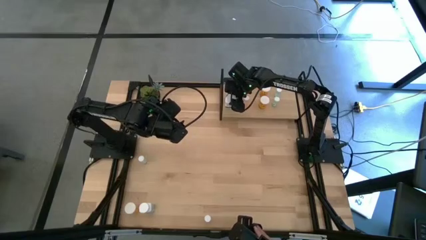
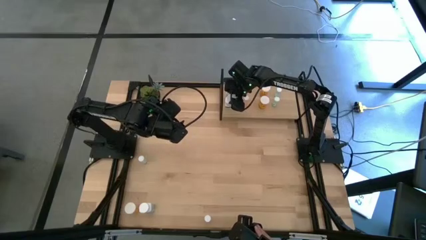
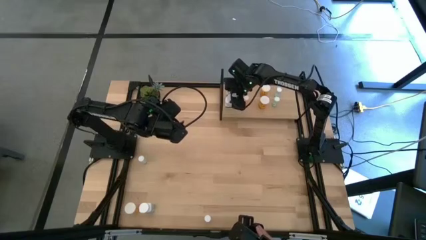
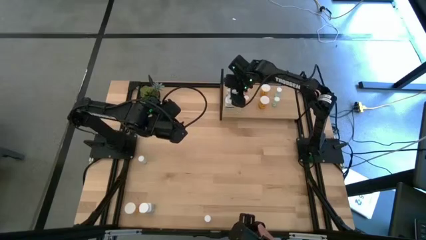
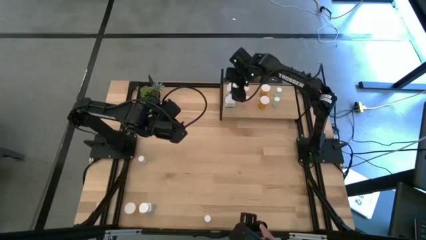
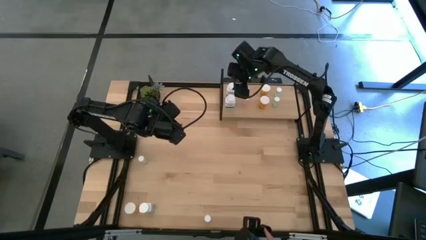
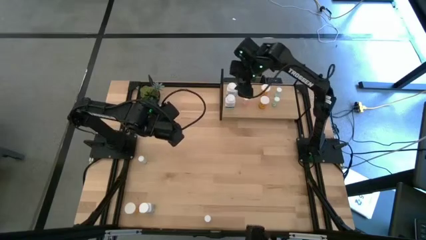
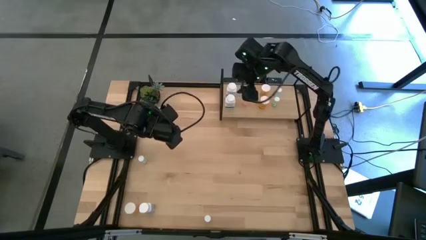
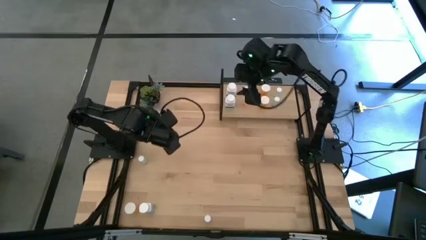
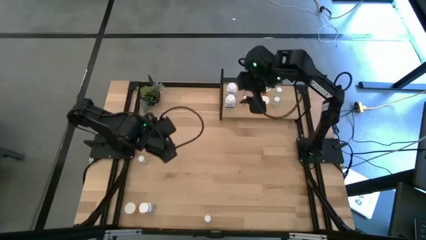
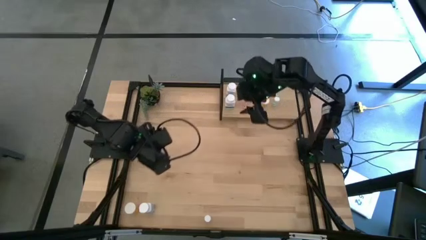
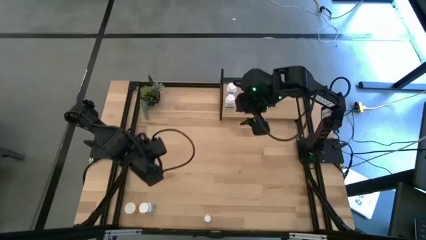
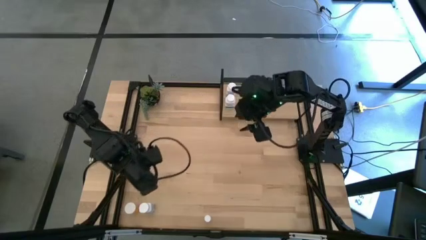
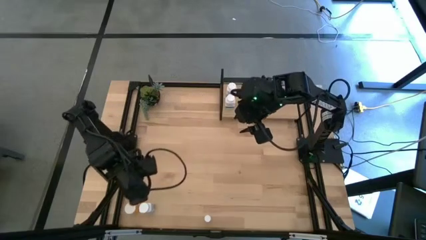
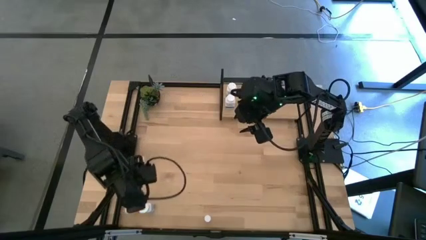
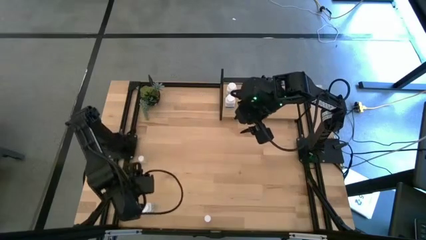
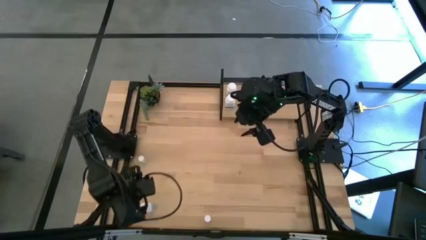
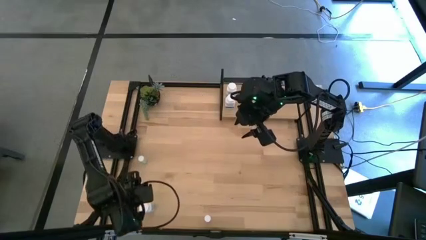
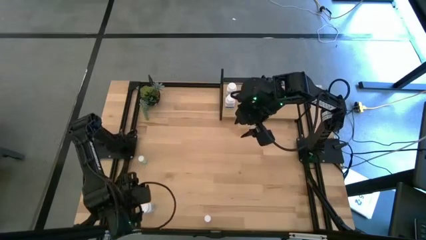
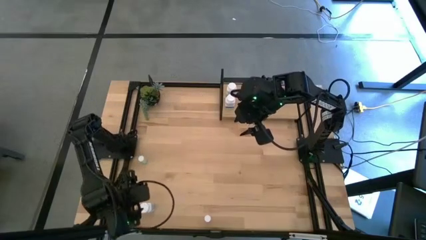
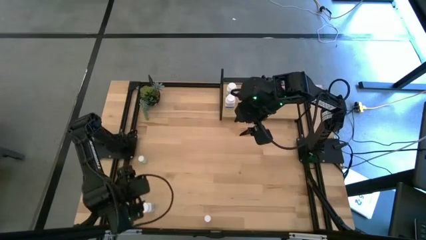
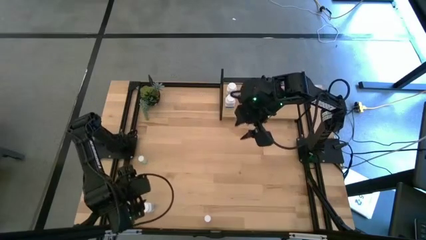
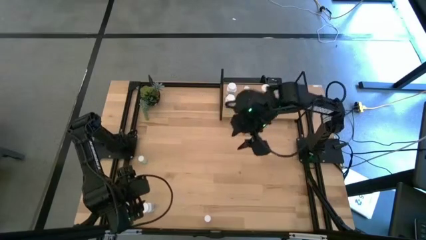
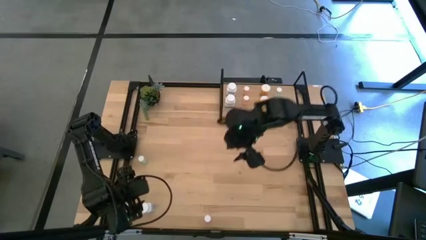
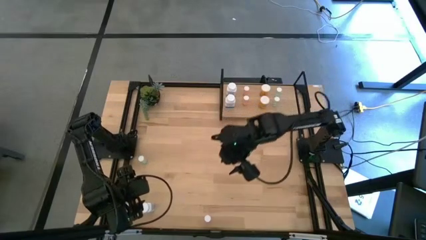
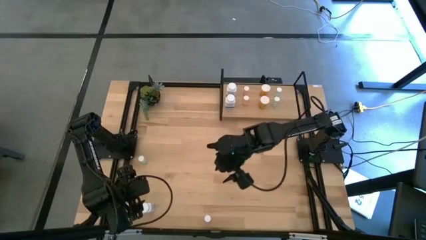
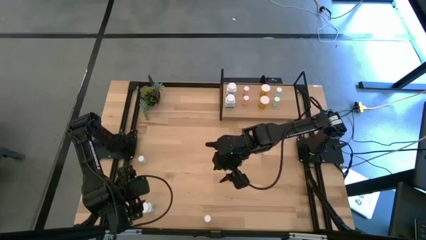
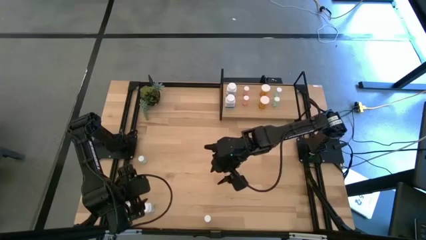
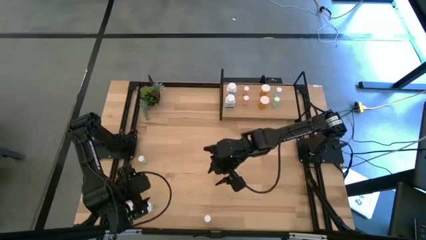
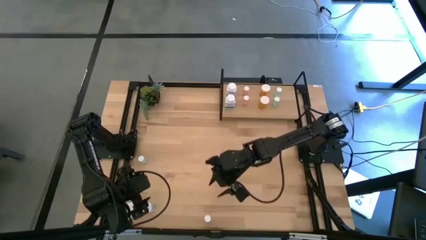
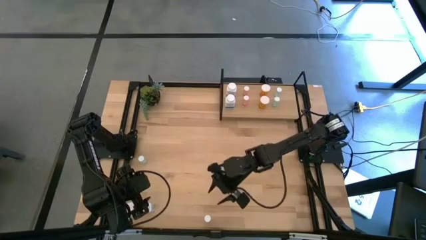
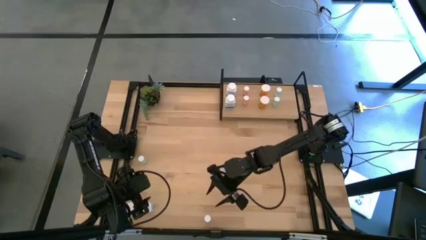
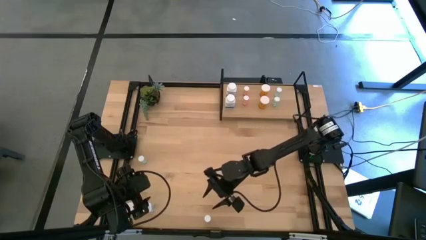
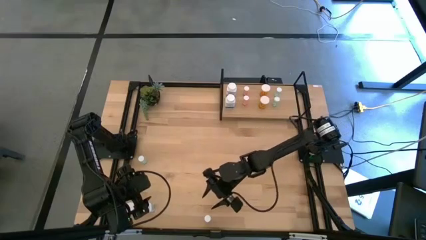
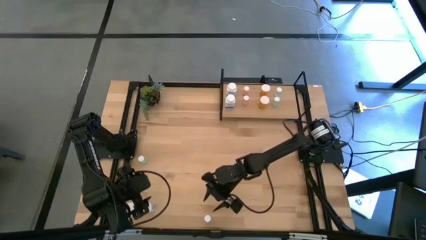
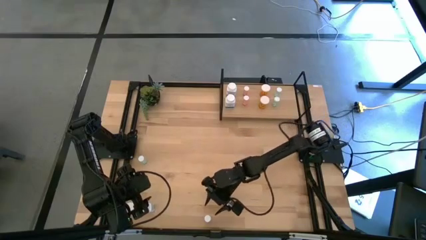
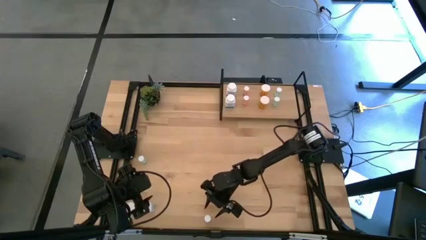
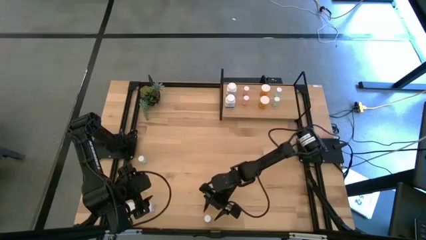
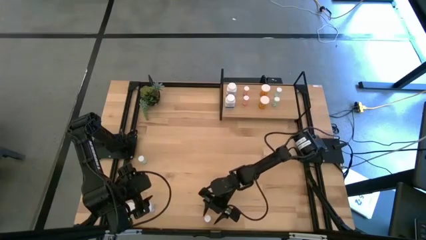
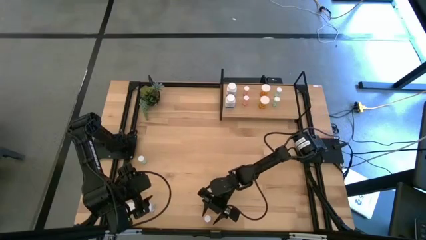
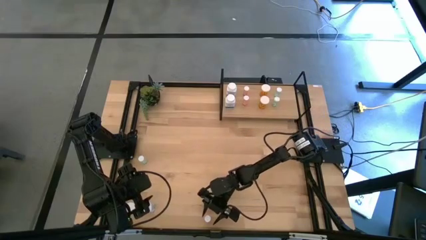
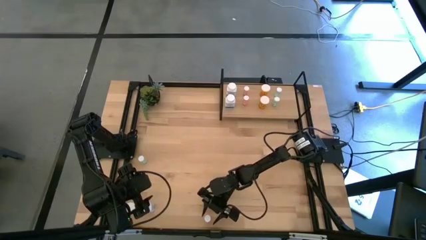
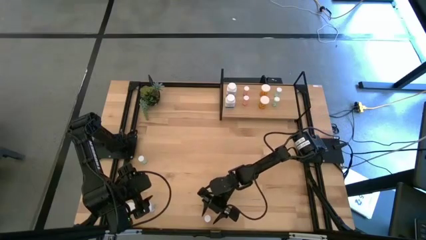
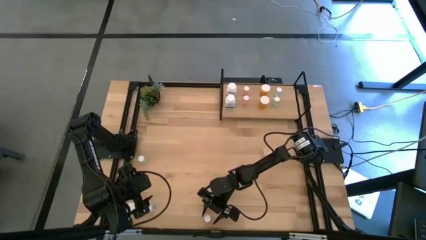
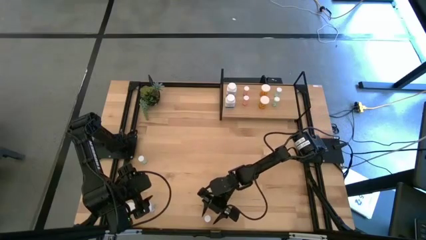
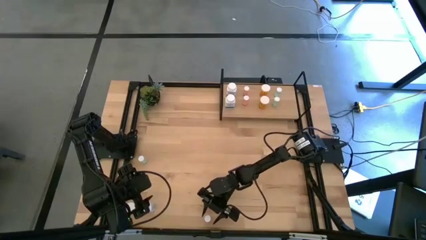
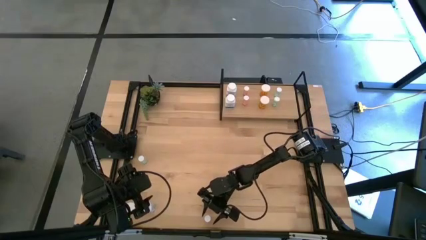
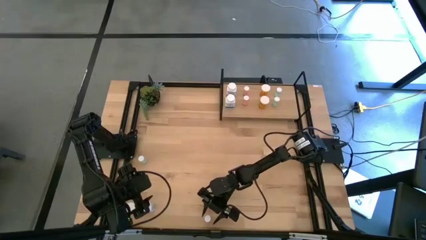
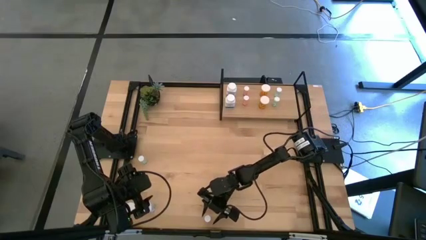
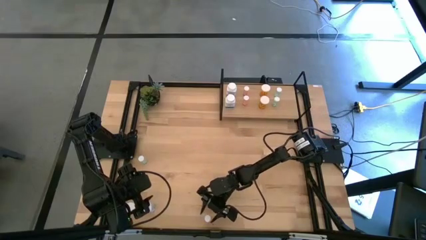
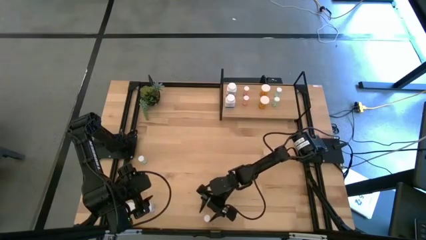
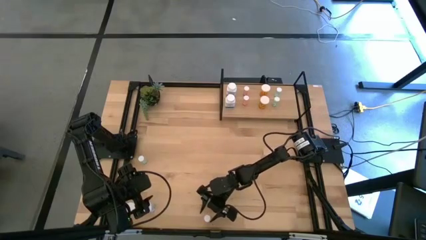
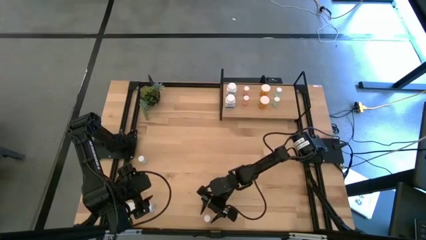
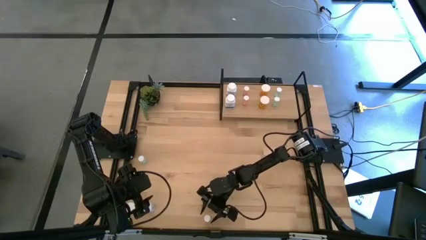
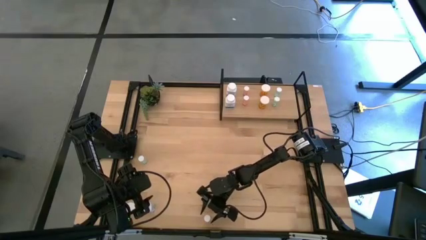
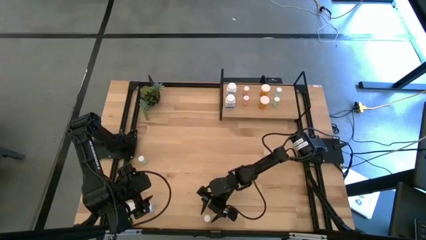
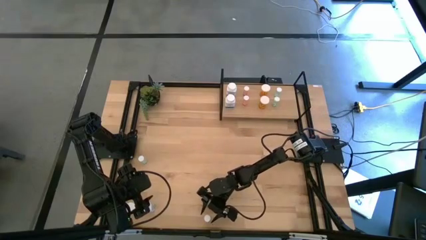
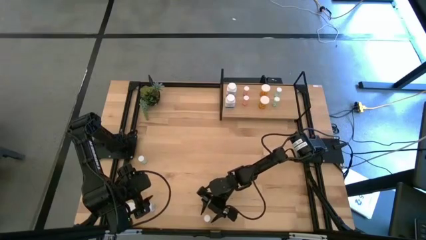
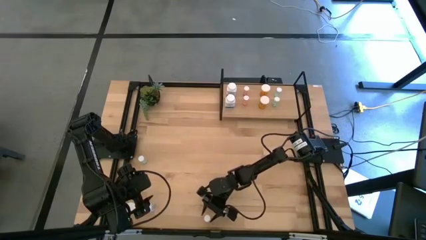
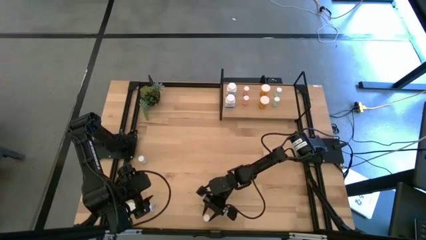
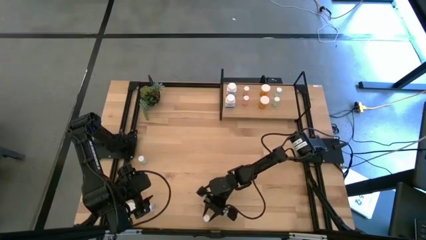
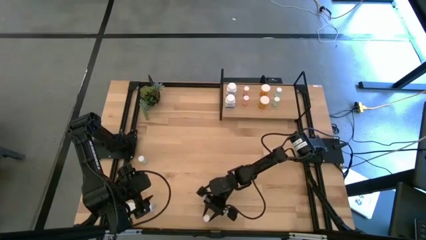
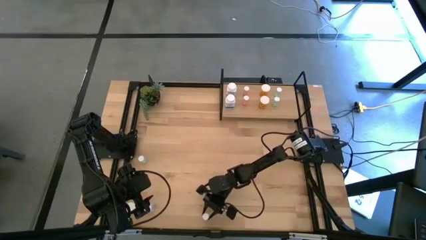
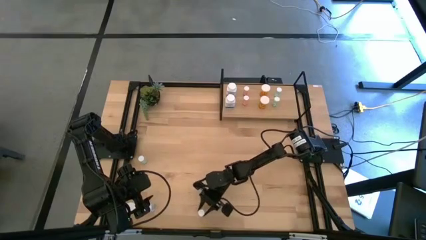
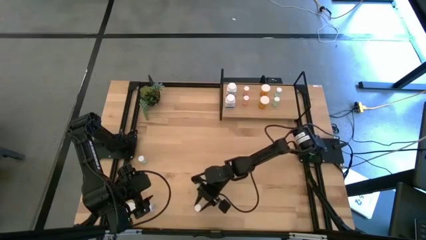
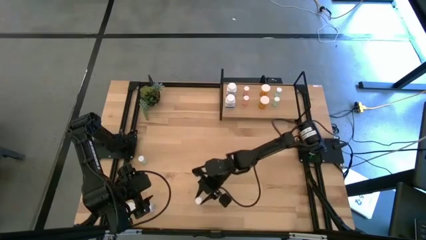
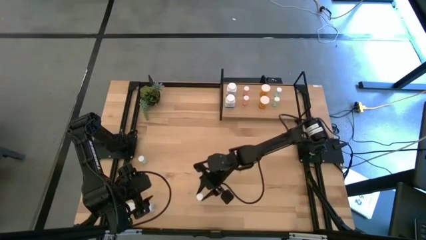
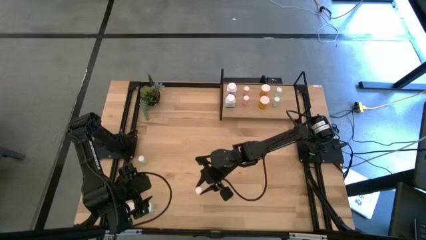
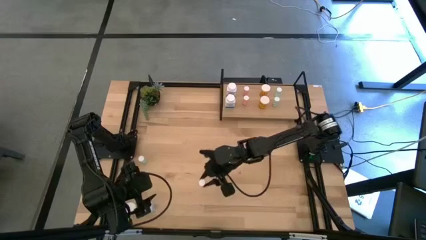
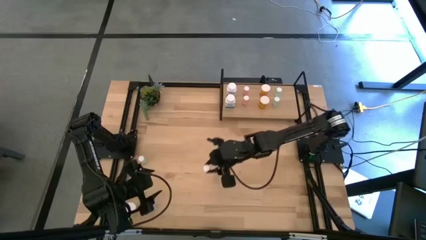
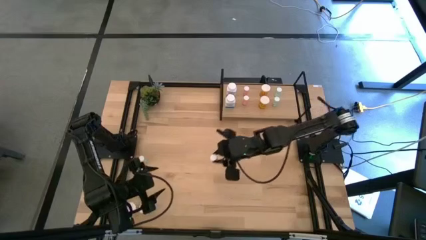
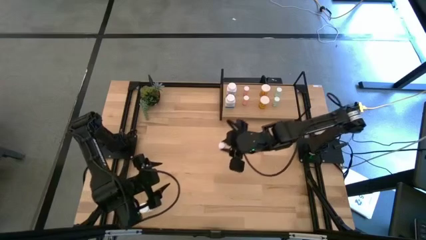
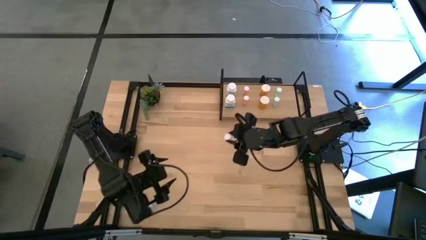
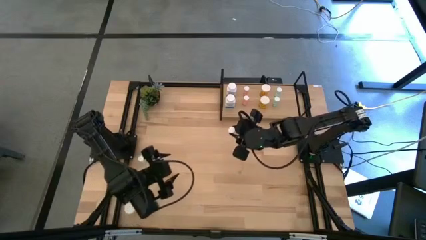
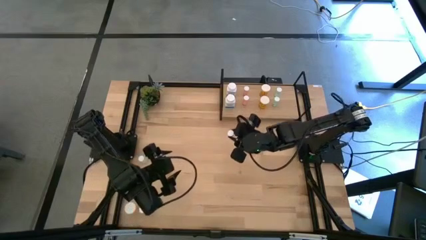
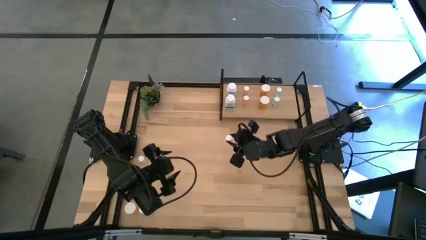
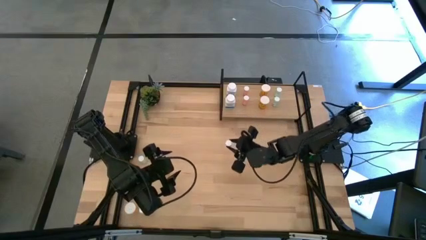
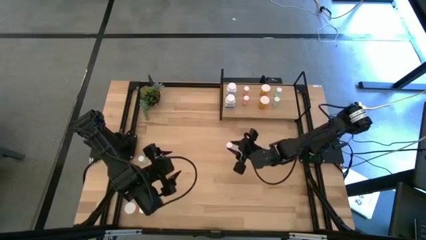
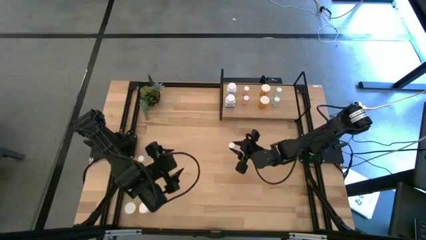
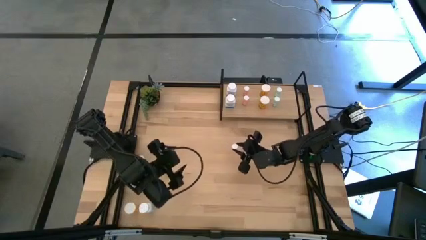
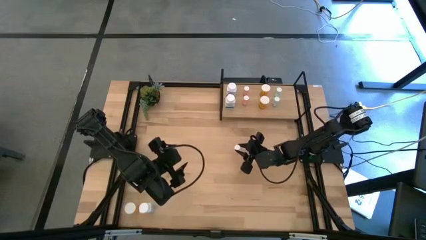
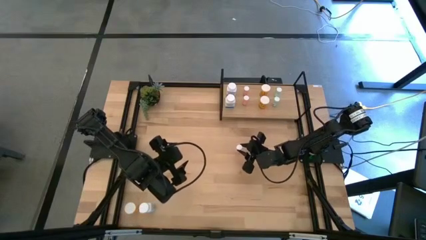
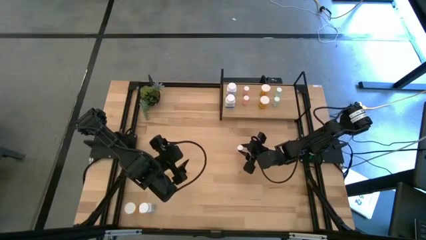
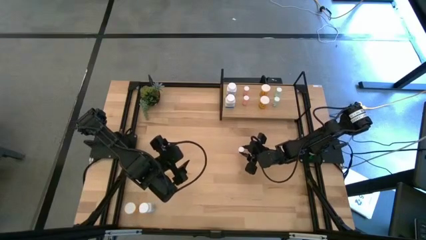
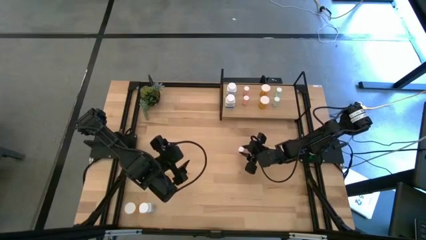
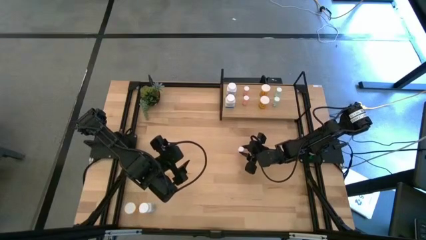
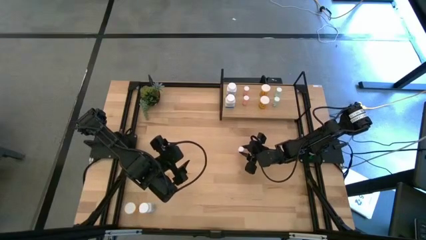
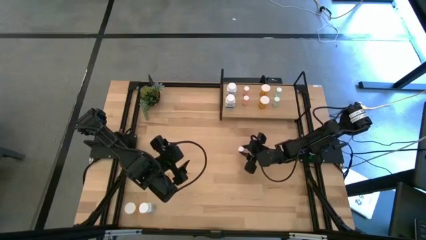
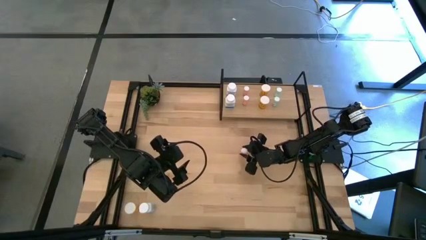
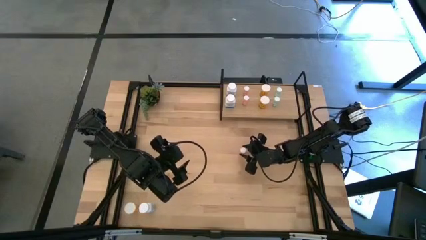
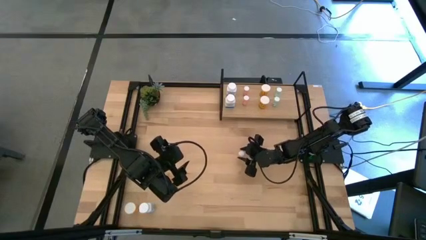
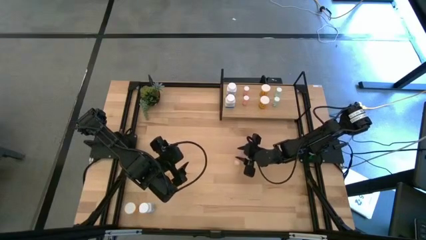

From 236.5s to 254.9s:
Task: Pick and place medicine bottles onto shelf by color
Put the pink pill bottle on the shelf aligned with the other pink pill bottles
